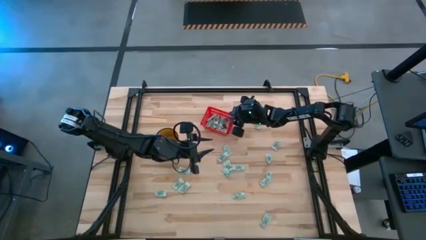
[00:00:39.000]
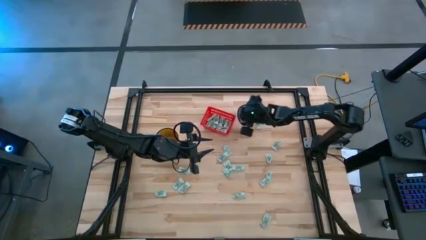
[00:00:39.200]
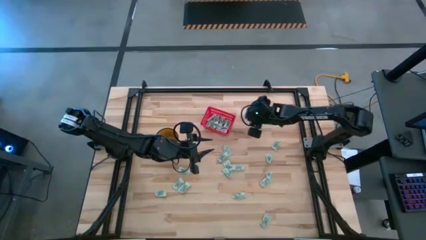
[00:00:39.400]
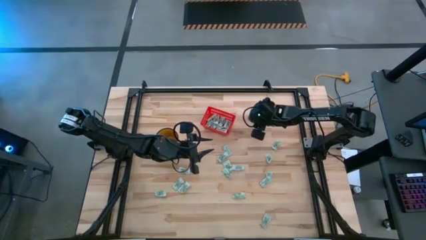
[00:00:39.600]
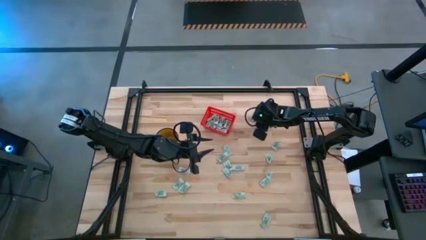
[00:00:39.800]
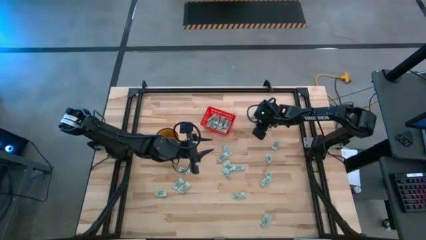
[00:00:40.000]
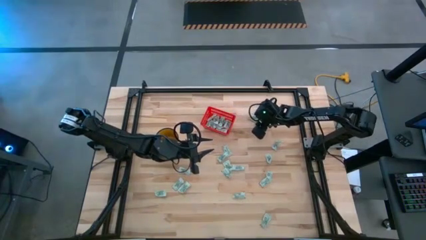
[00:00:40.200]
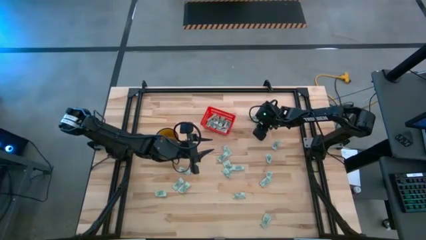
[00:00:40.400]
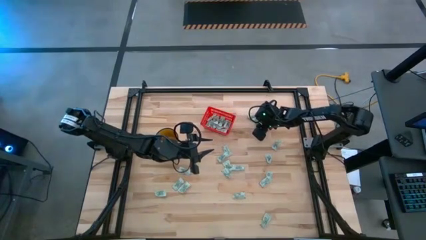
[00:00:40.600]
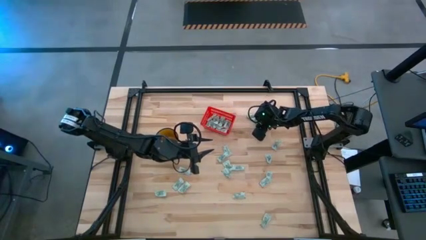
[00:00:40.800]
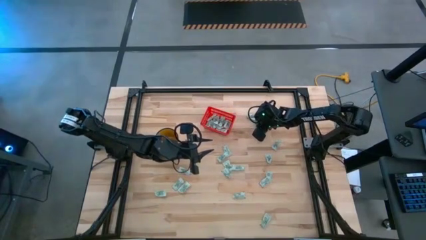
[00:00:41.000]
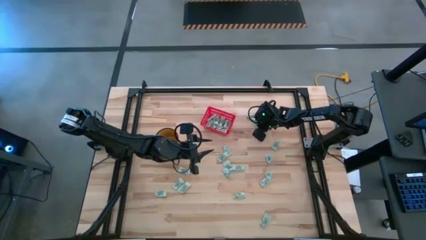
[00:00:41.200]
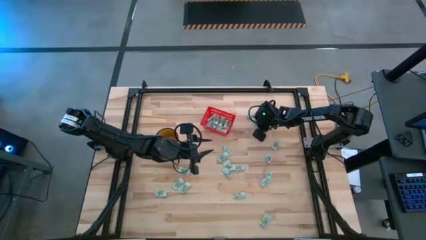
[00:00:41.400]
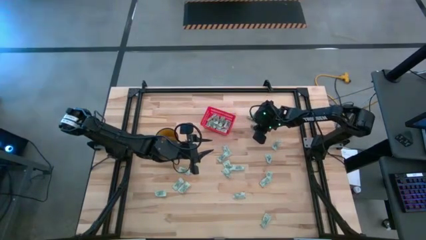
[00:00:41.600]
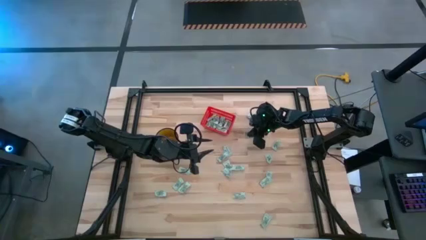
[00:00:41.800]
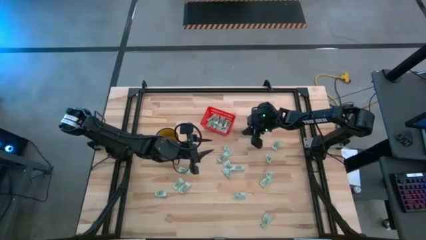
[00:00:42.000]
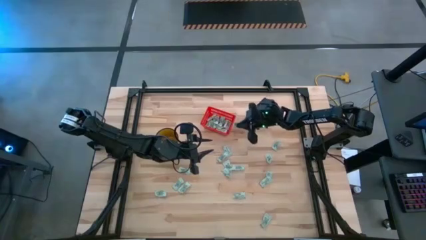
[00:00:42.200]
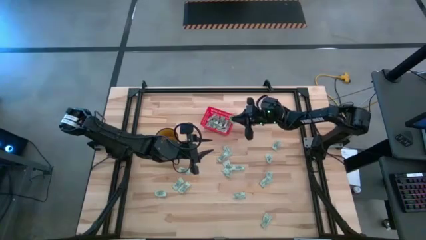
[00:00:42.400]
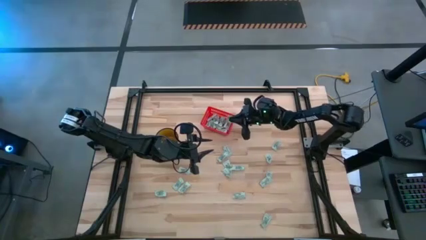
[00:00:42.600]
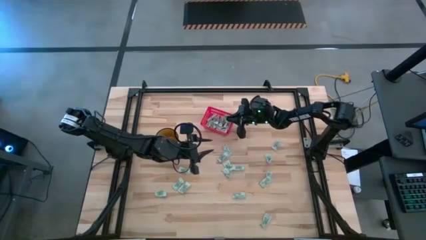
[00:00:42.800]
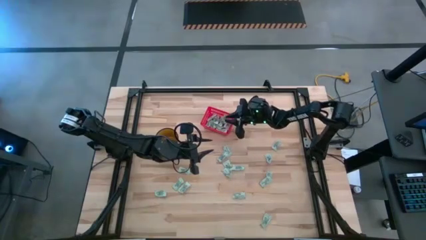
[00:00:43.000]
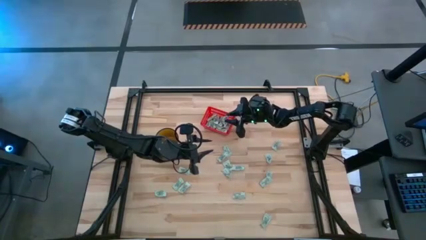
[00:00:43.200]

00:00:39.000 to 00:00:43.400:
Task: Pick and place Stevia / Truvia into bins
Put the stevia packet into the red basket

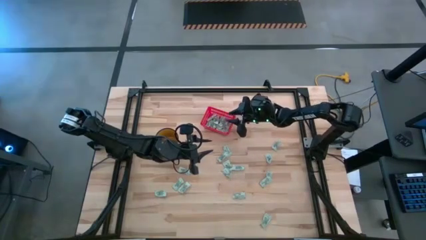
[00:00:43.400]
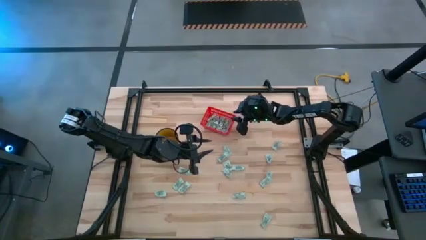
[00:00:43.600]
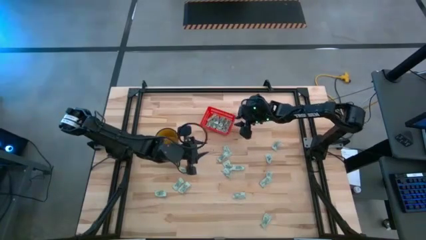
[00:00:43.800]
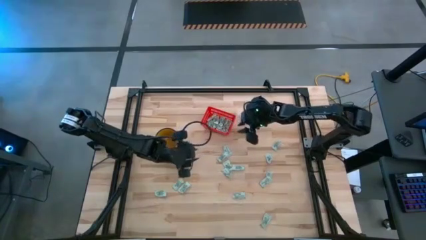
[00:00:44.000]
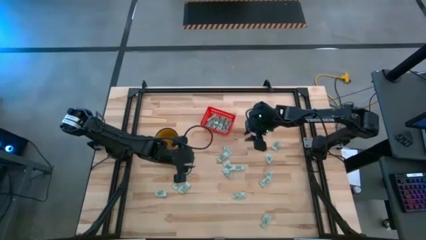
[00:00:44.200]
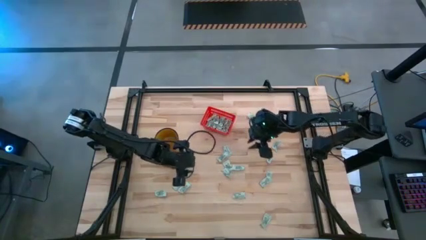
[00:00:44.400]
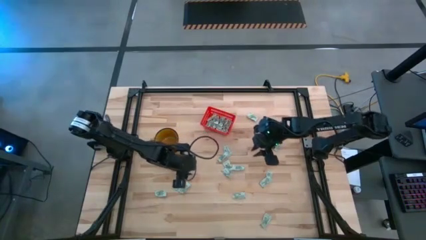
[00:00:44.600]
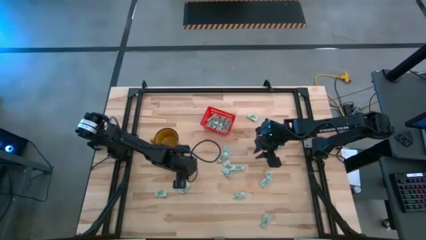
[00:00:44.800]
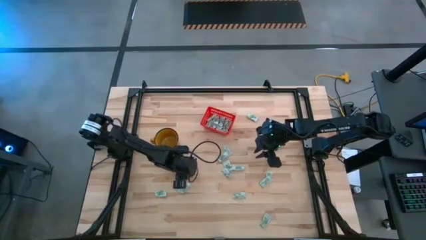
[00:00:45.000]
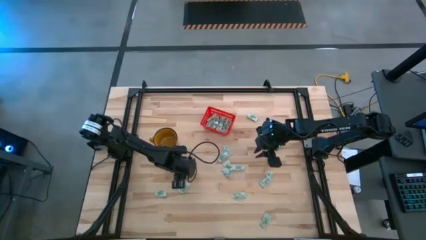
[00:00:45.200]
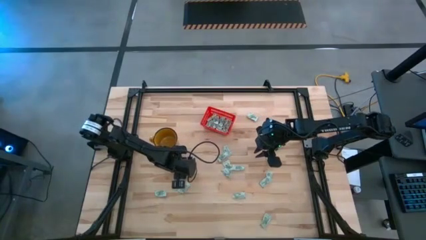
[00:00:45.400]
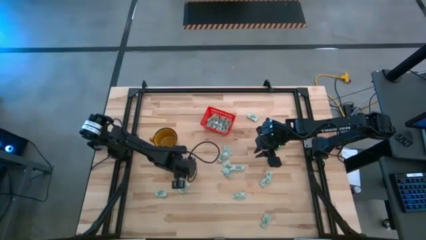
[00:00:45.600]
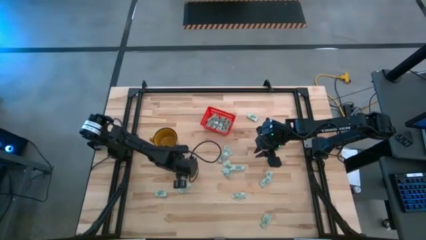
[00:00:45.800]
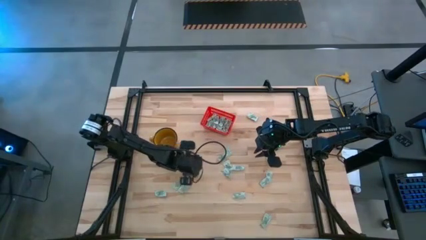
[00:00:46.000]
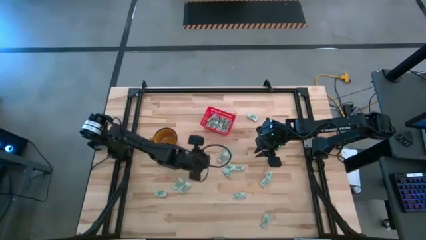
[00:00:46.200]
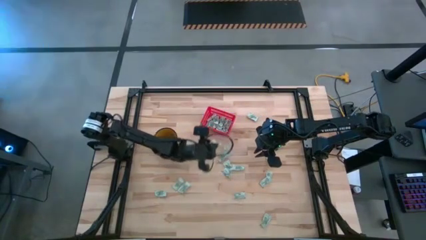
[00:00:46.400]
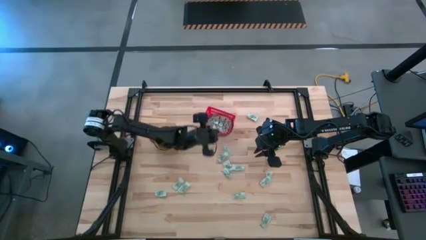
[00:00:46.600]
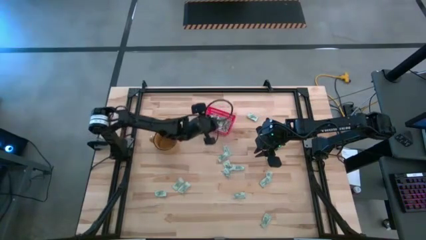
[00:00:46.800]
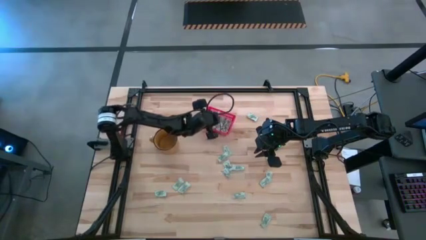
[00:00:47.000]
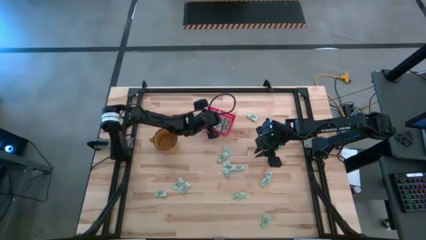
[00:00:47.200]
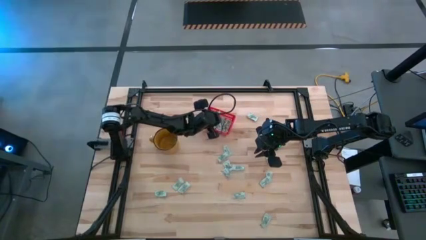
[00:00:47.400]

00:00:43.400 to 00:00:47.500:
Put the stevia packet into the red basket

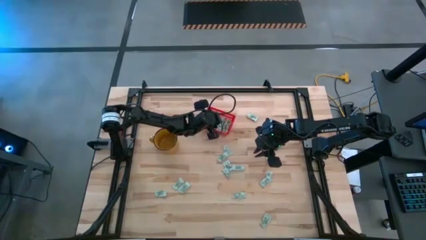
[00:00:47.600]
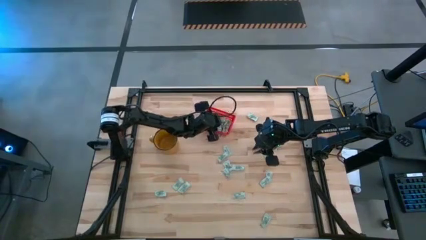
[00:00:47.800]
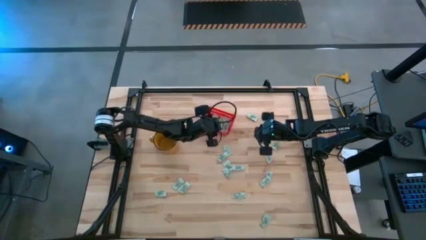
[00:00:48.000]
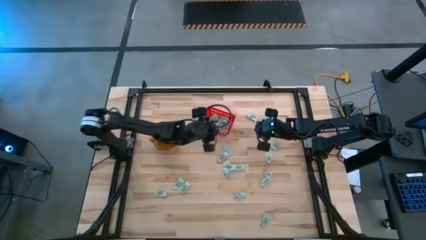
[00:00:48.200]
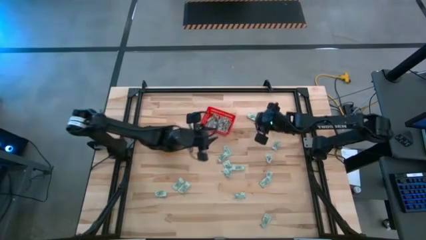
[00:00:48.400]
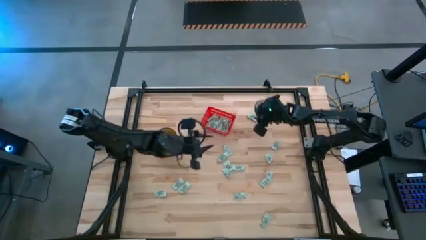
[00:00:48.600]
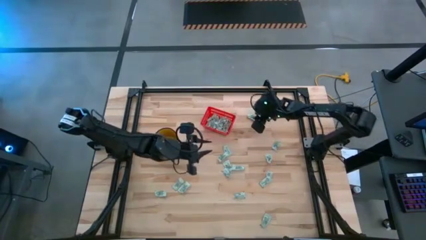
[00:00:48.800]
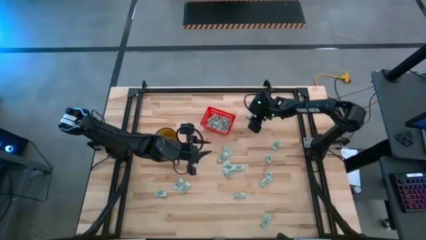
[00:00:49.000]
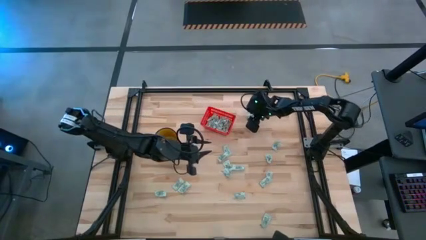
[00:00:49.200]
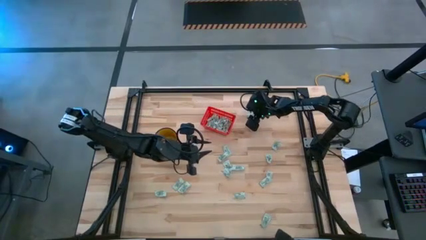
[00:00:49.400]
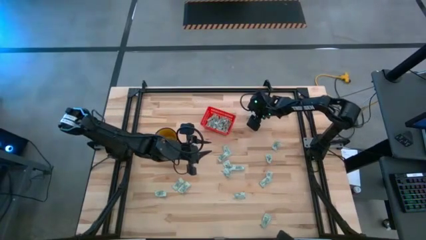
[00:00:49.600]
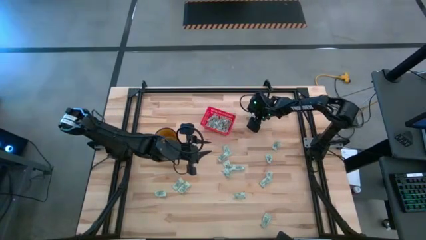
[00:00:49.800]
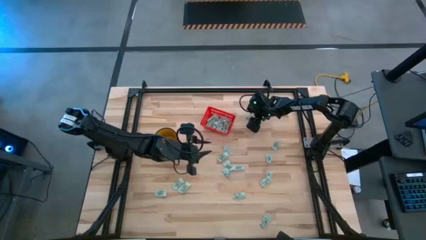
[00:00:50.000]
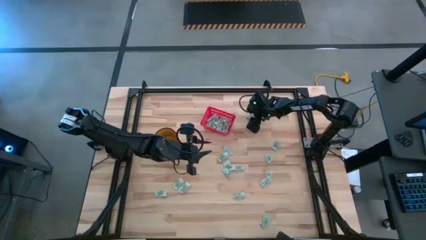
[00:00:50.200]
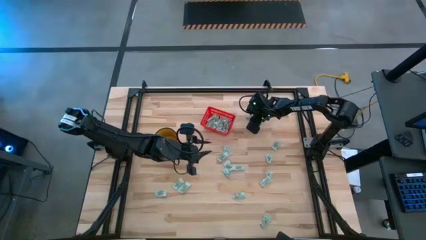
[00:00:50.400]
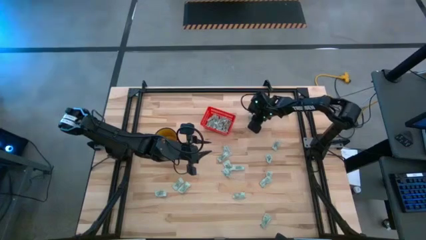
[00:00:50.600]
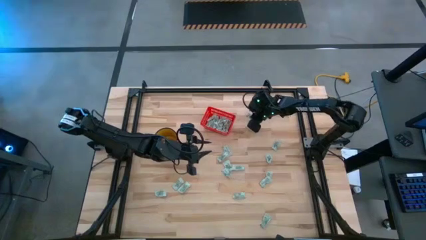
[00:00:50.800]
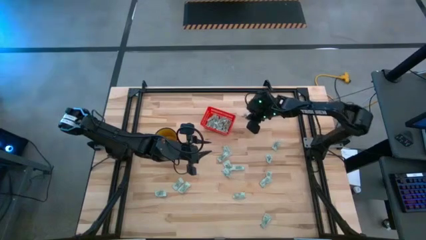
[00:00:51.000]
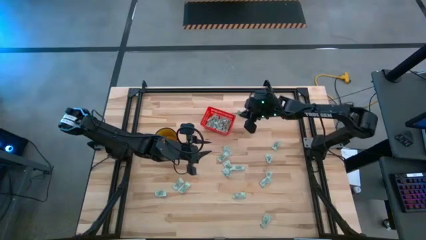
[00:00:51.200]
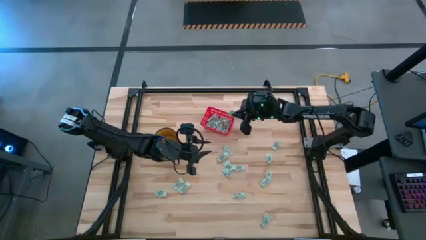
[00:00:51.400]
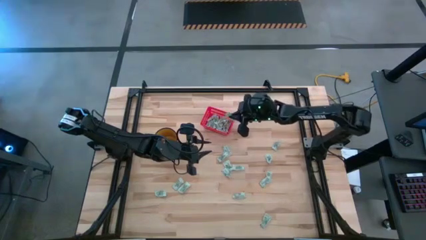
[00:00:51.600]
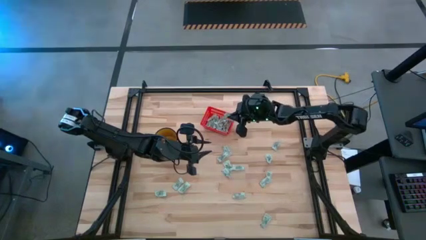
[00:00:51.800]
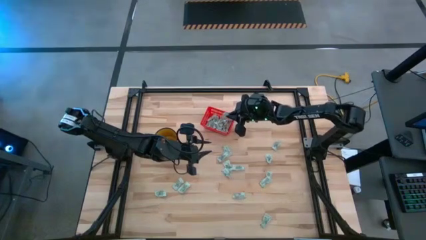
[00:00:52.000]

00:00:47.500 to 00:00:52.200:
Put the stevia packet into the red basket

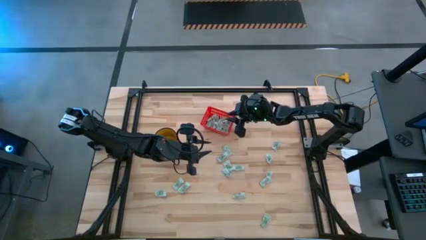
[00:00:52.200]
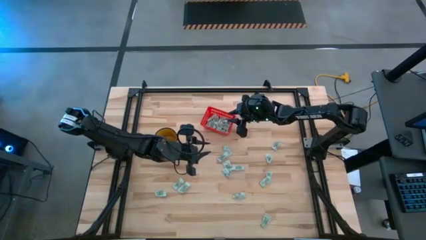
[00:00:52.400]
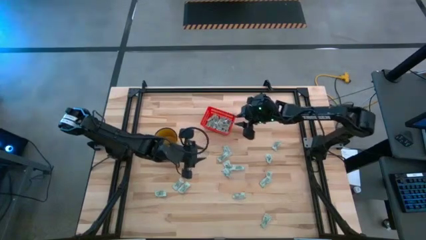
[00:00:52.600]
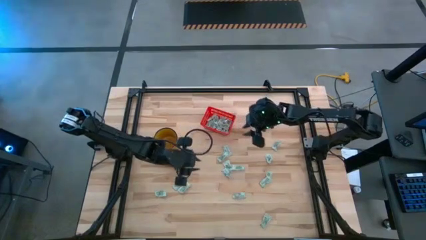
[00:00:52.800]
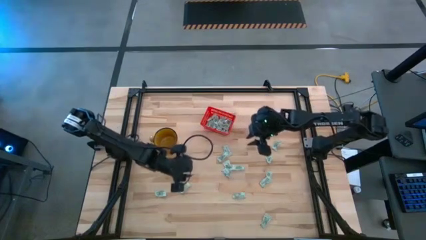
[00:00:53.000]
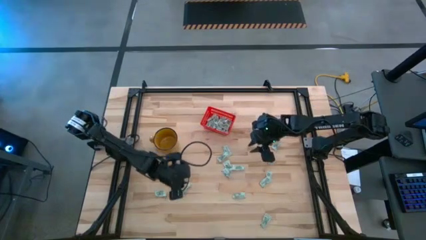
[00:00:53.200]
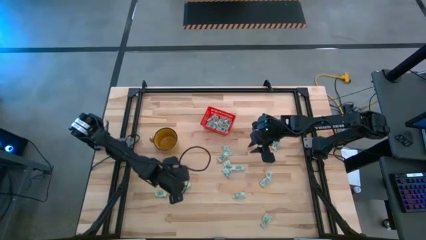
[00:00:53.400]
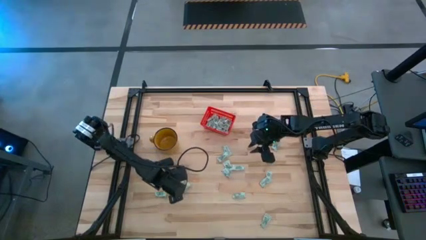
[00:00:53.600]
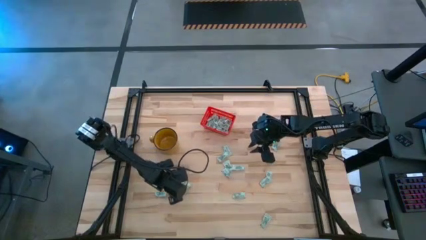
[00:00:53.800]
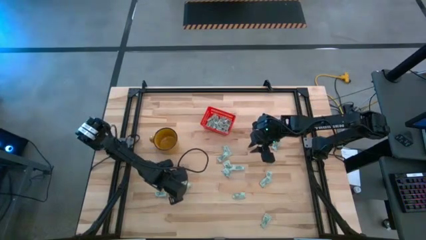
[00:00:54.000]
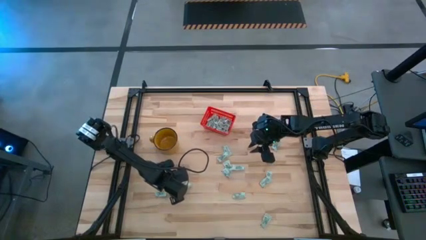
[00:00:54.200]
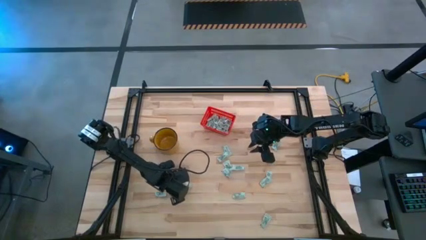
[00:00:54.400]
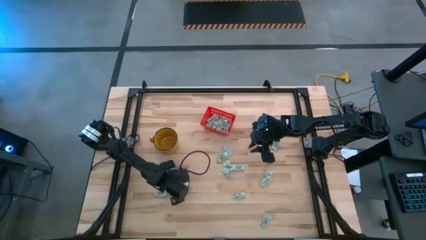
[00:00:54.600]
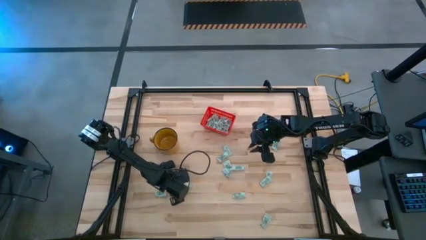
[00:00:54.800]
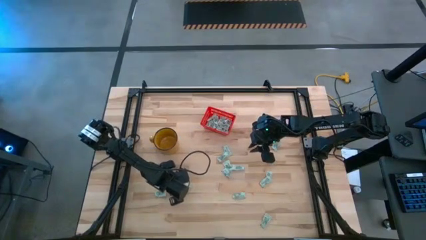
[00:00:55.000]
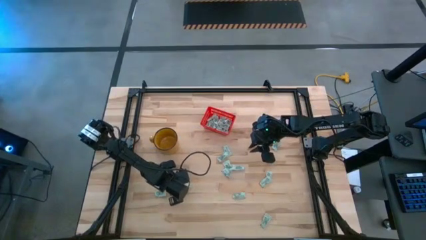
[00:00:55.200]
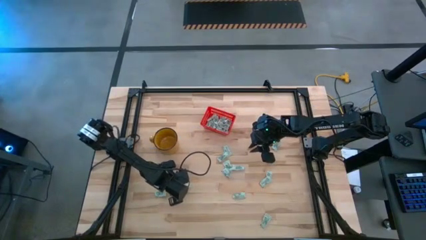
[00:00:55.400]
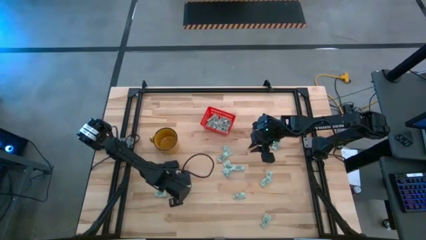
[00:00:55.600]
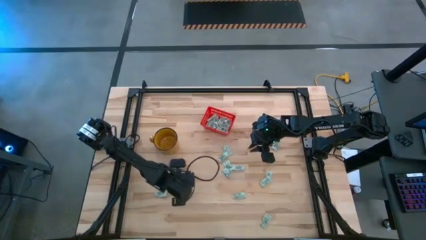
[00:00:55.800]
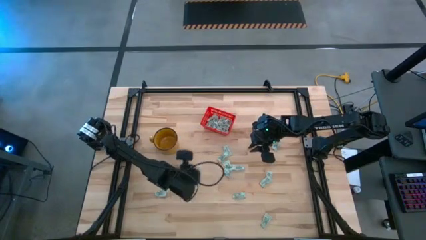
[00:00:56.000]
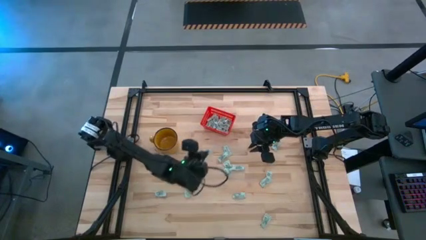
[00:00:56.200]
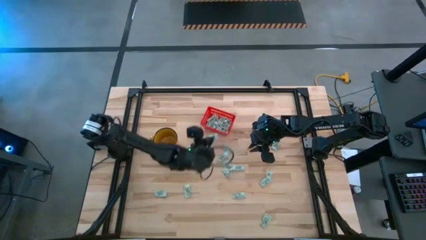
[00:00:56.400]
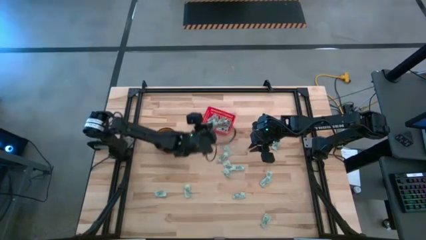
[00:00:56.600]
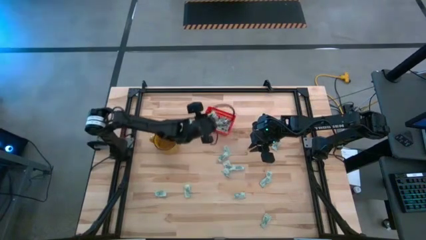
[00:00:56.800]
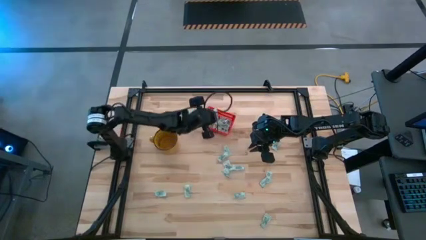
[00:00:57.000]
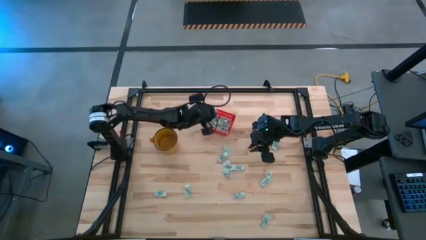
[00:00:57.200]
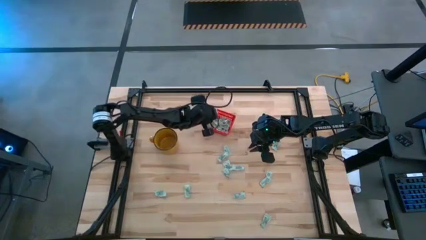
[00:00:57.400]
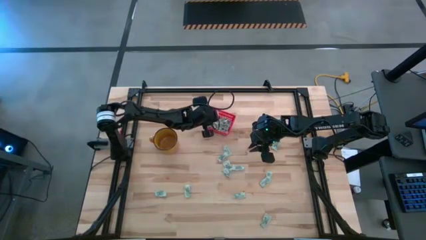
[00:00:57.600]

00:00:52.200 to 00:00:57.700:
Put the stevia packet into the red basket
